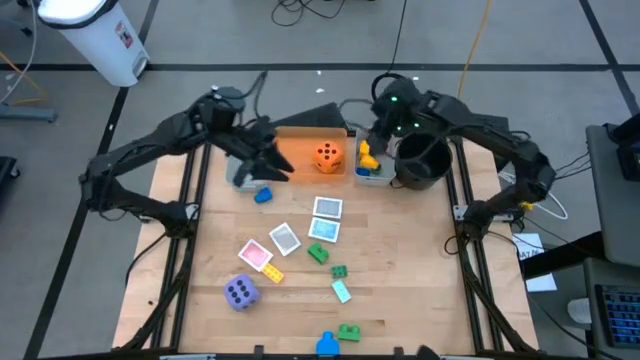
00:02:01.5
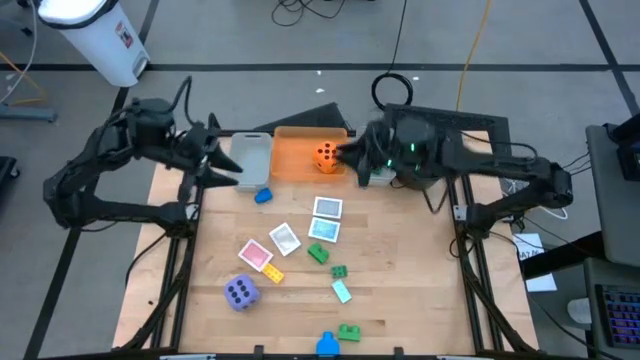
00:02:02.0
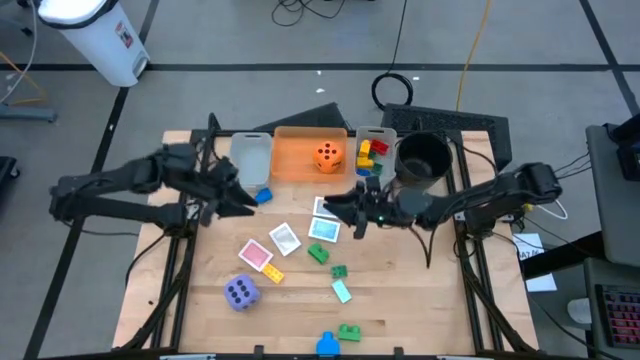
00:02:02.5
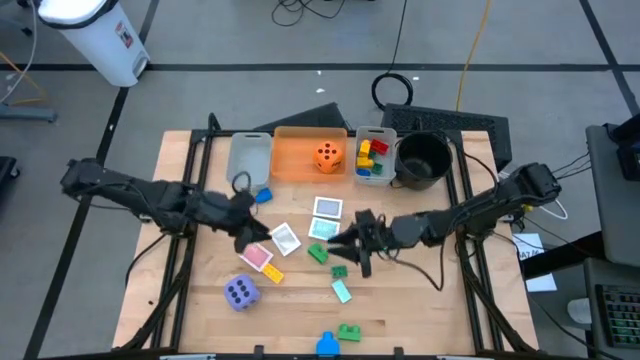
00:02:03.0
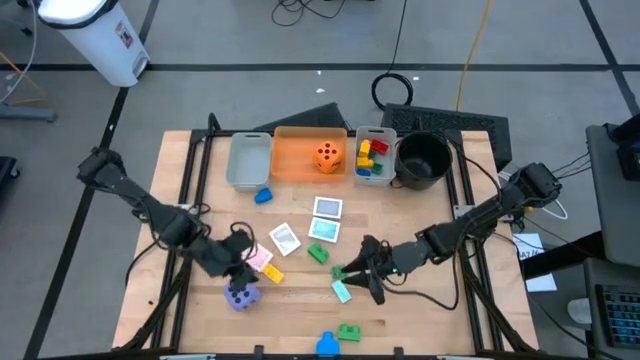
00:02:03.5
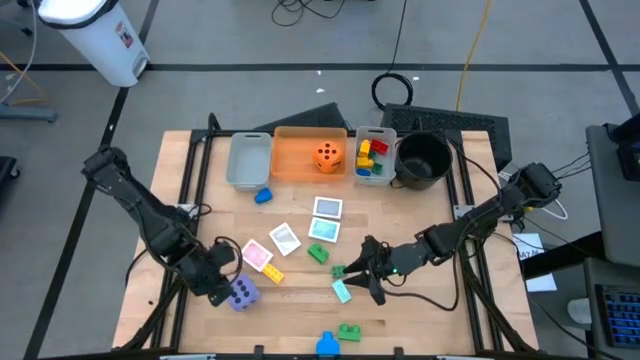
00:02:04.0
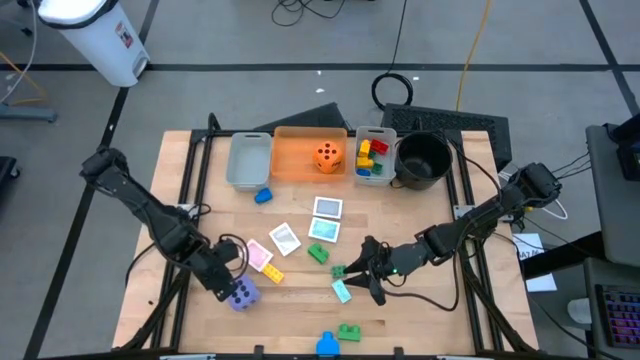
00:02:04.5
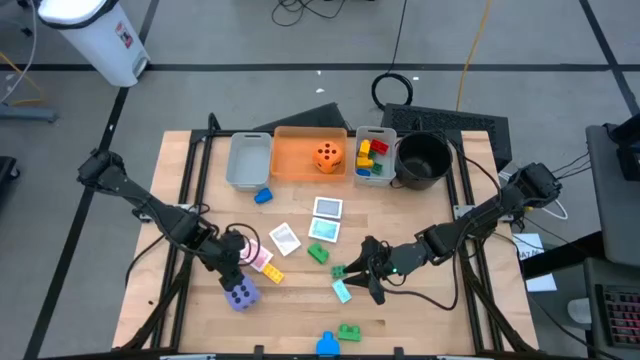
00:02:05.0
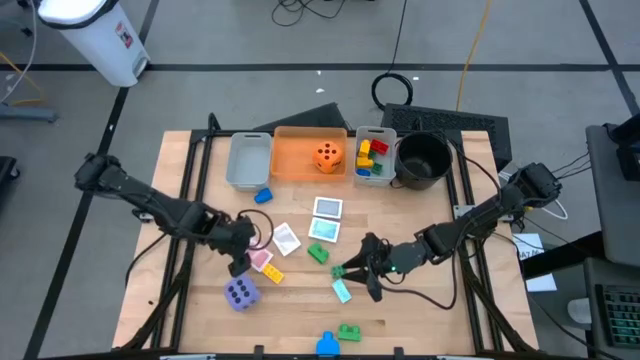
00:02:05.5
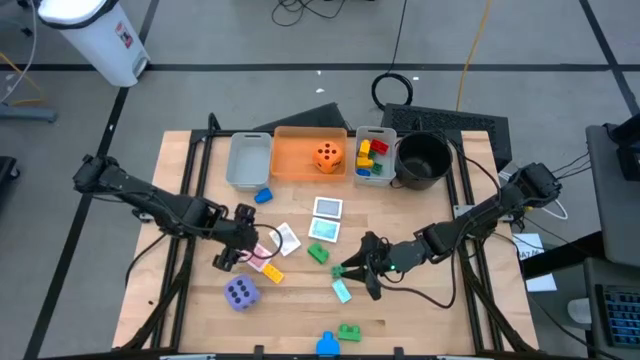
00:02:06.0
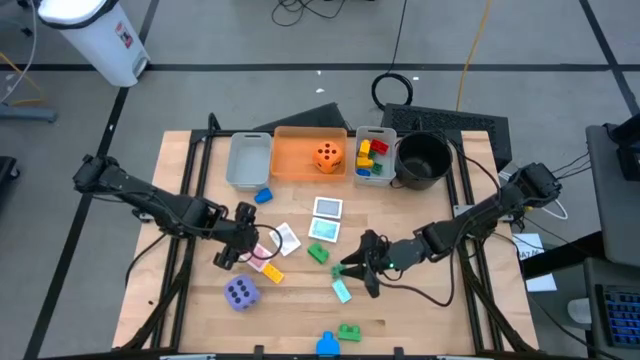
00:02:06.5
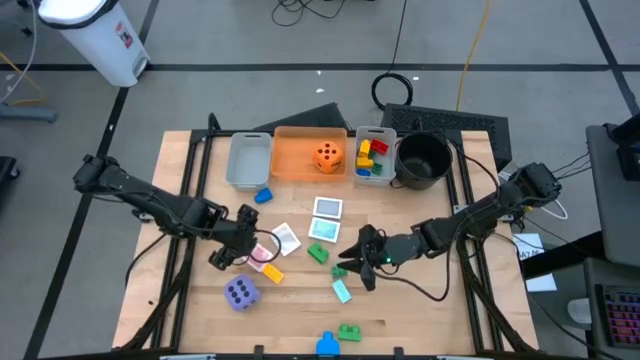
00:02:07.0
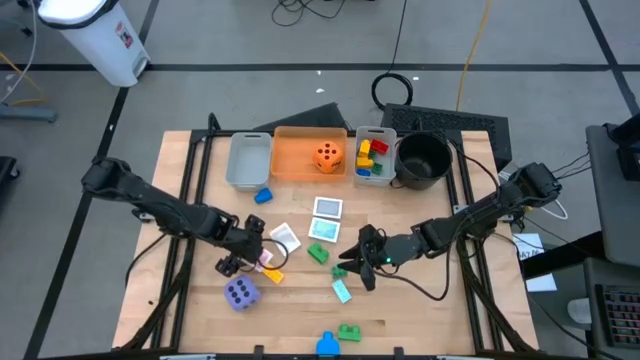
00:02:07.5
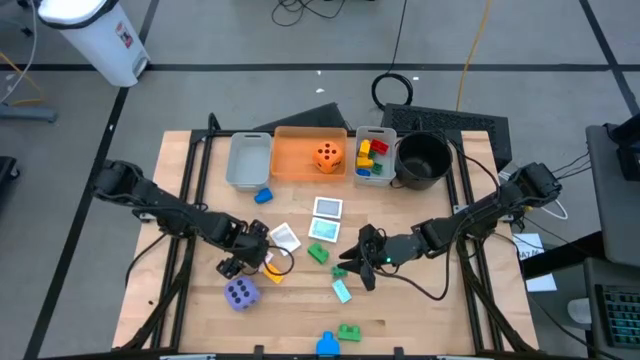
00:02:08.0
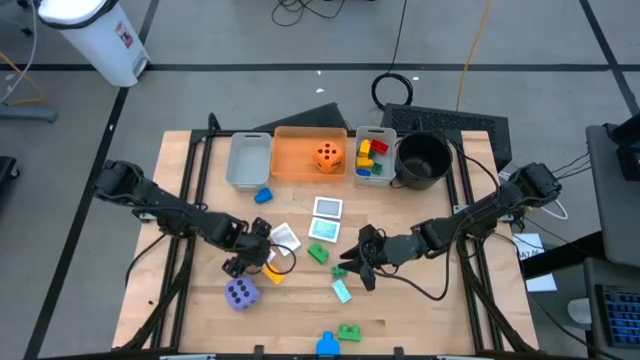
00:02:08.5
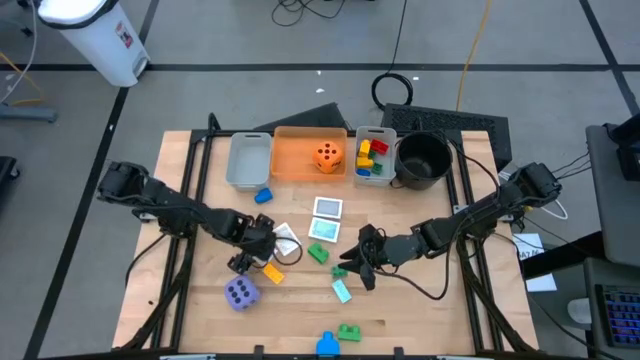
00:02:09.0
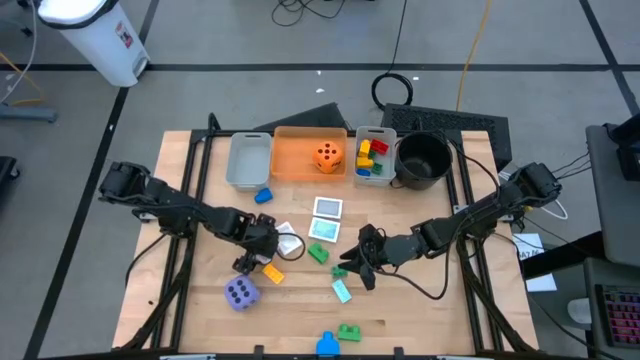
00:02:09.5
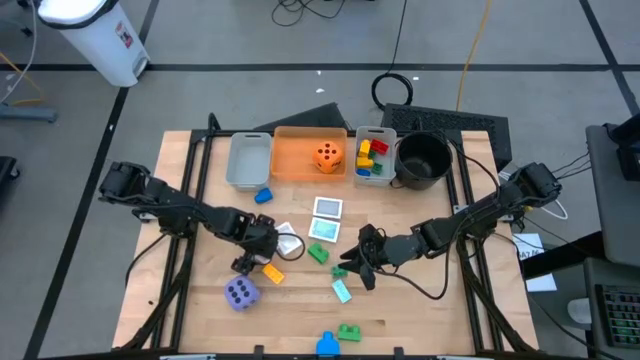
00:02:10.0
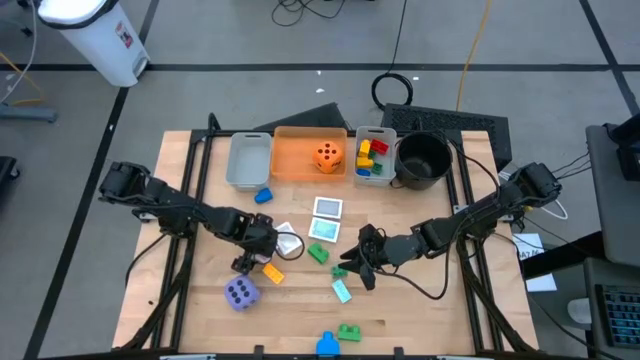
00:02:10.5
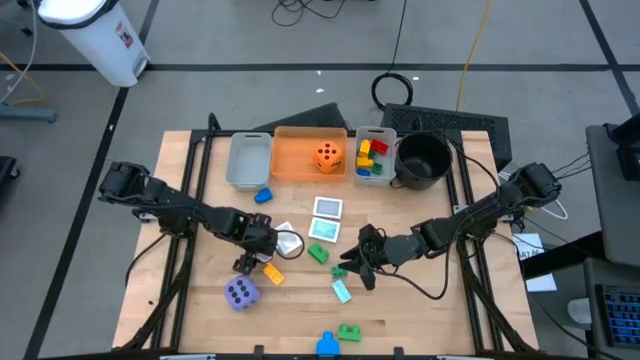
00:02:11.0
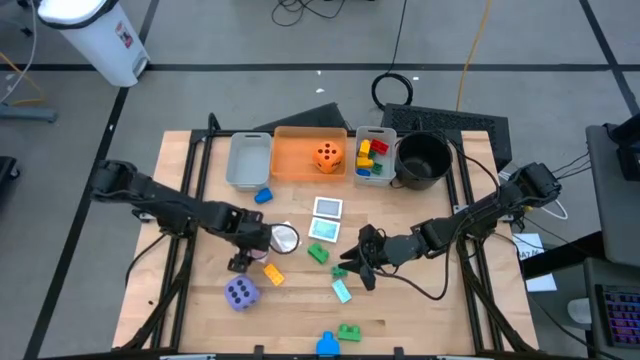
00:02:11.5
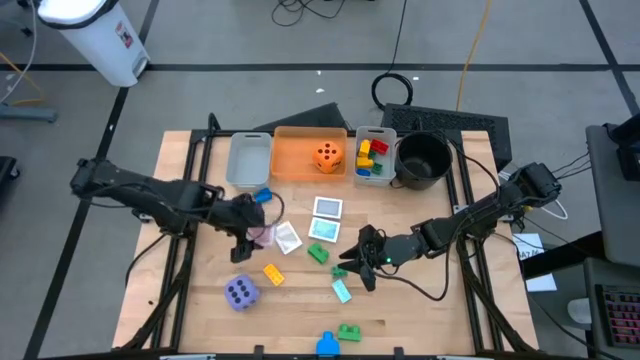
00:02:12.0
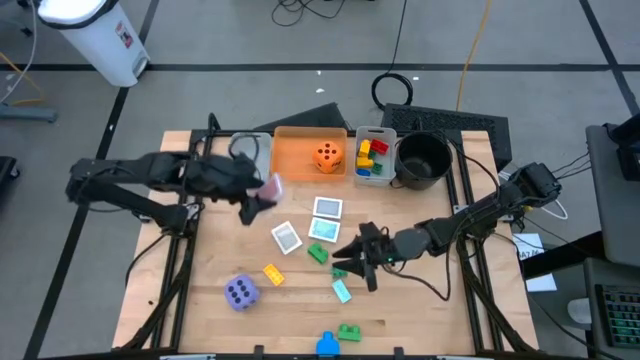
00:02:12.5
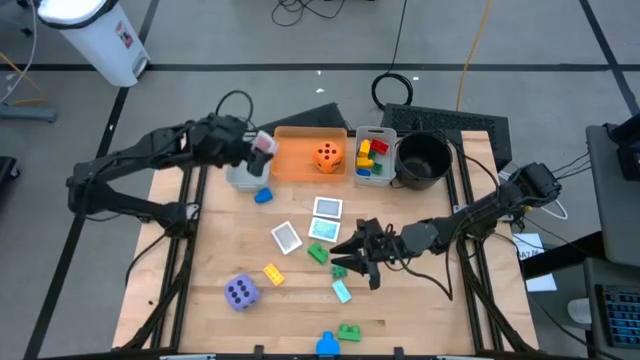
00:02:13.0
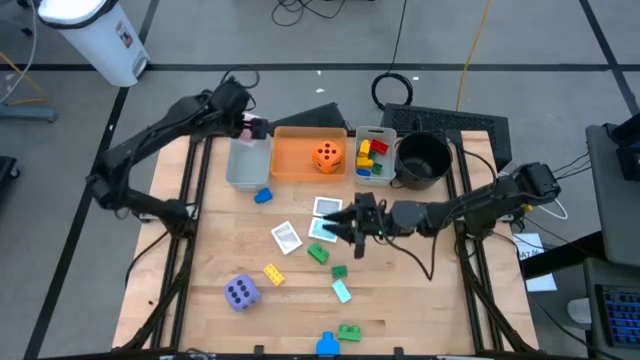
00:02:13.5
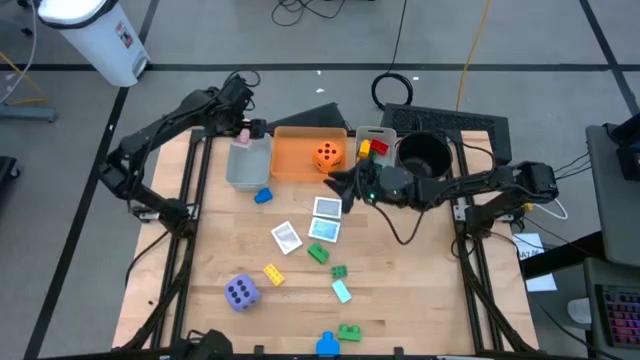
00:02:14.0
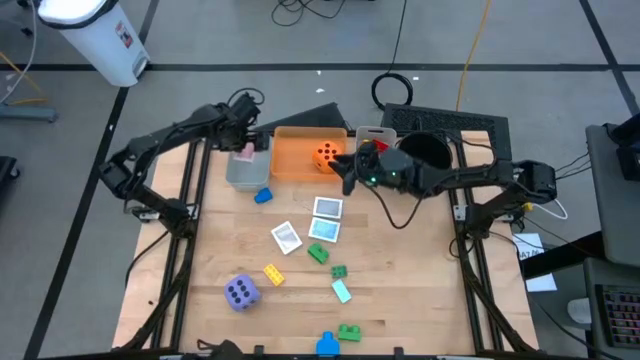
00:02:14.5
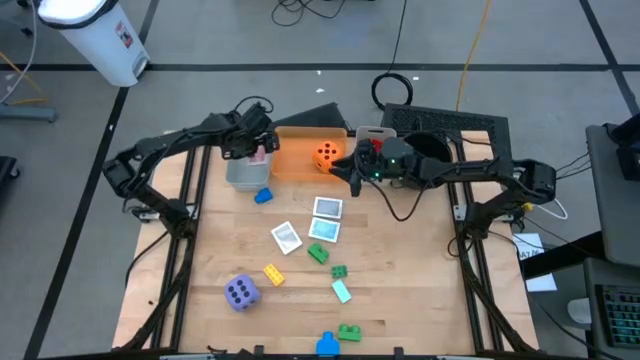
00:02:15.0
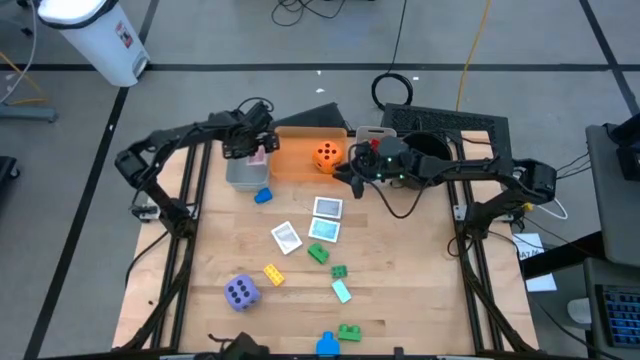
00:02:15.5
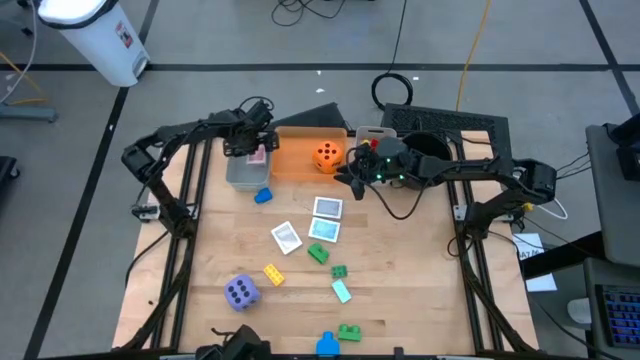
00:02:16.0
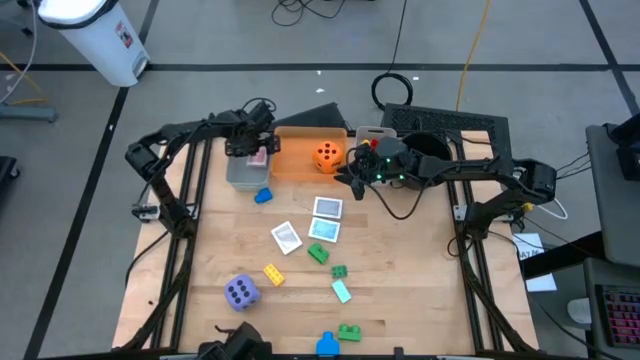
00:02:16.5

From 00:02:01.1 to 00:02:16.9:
Task: Pick & Place Toys
Put the red deck of cards into the left gray bin

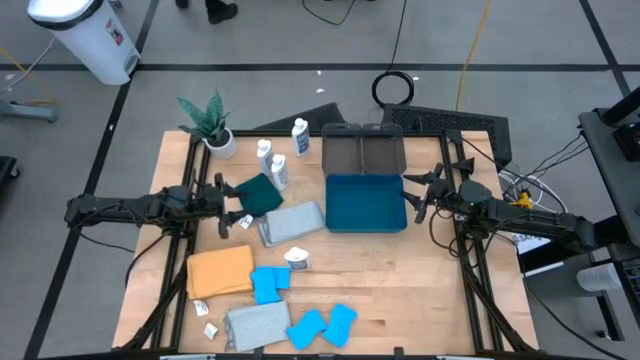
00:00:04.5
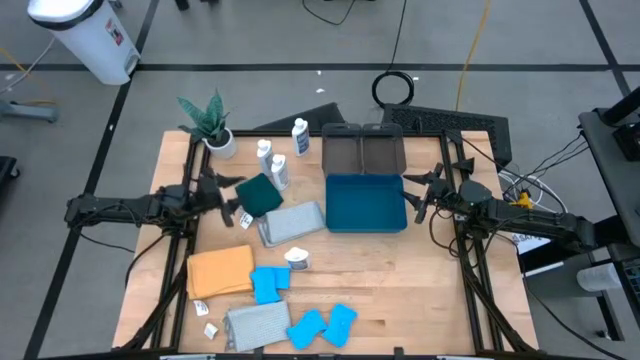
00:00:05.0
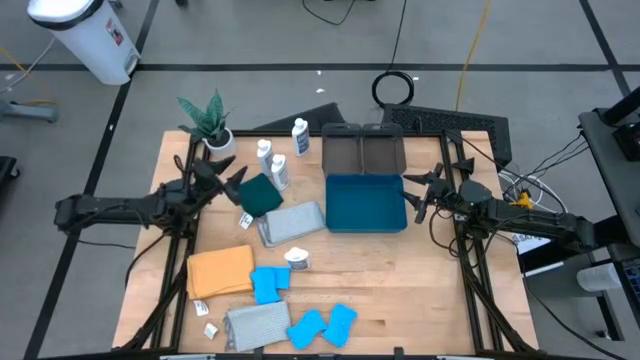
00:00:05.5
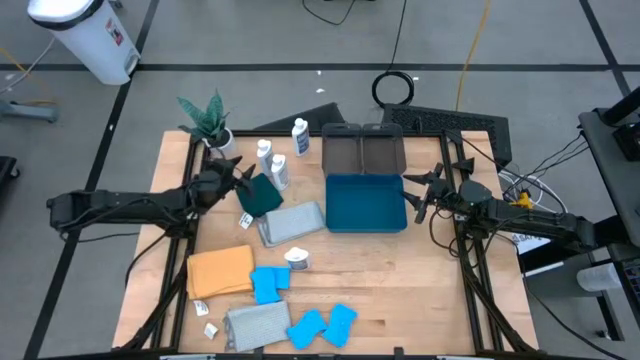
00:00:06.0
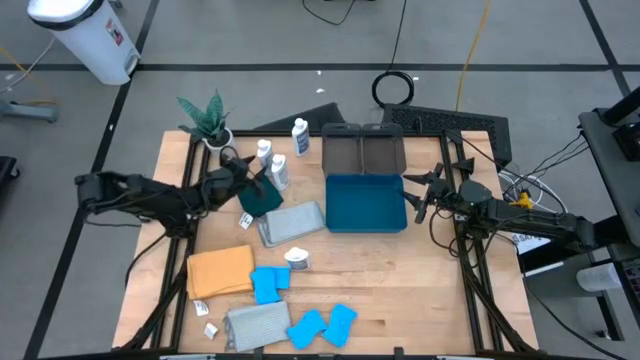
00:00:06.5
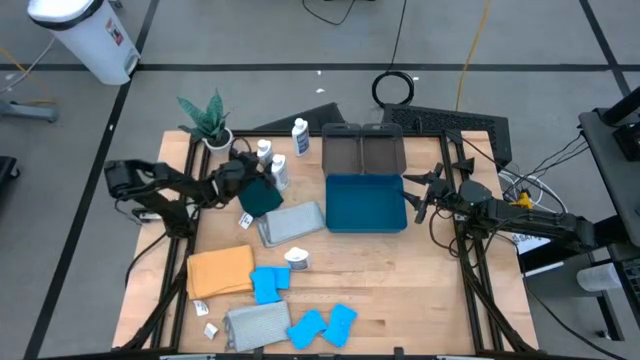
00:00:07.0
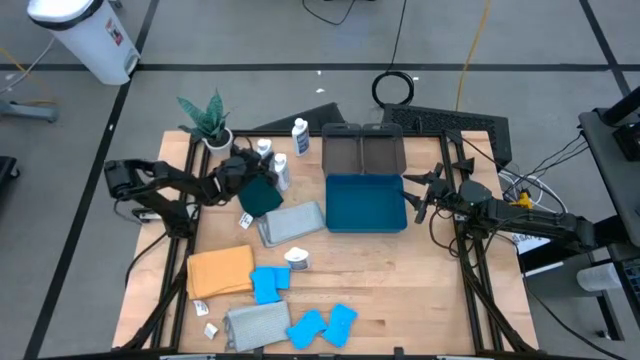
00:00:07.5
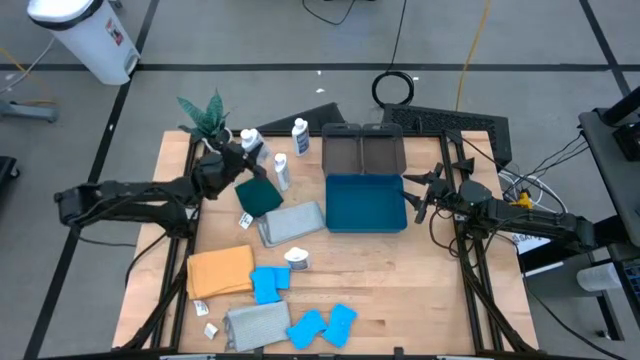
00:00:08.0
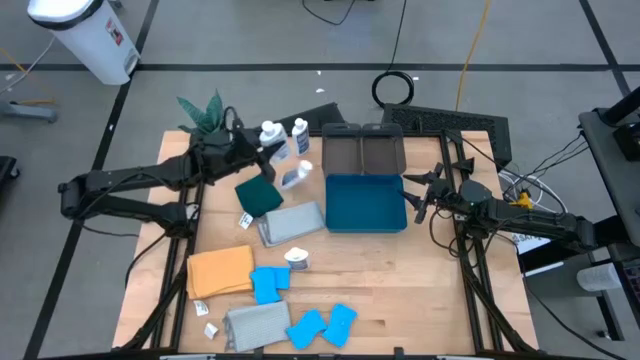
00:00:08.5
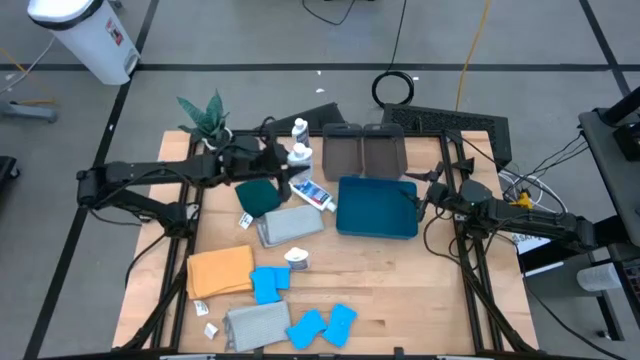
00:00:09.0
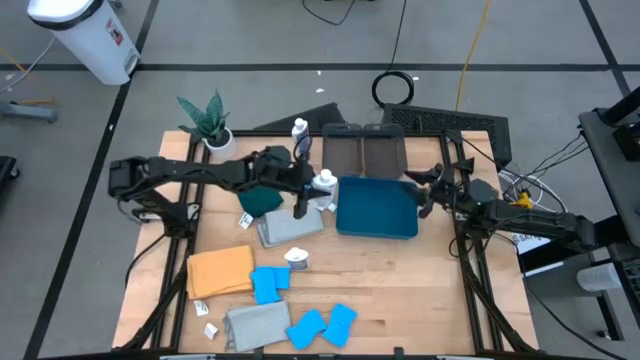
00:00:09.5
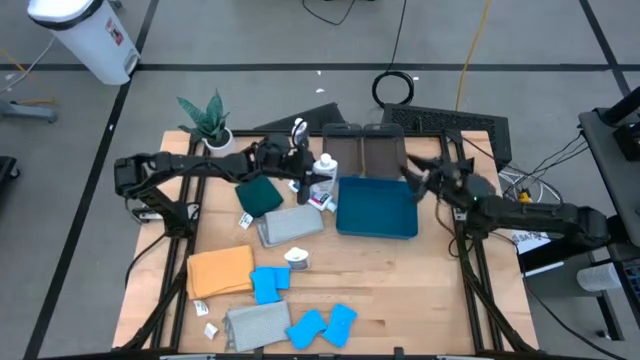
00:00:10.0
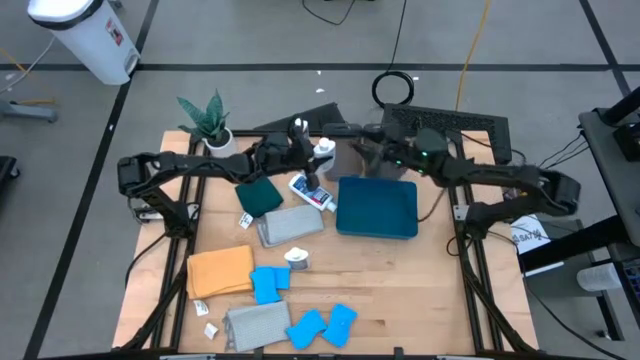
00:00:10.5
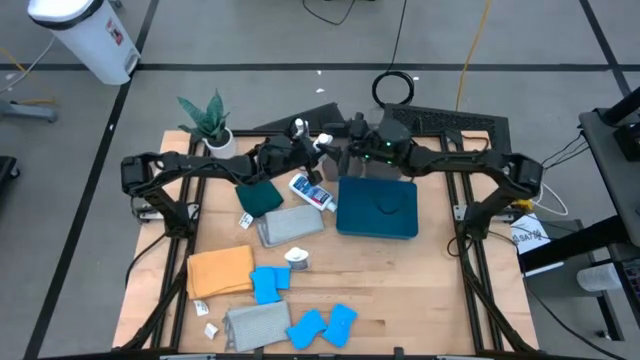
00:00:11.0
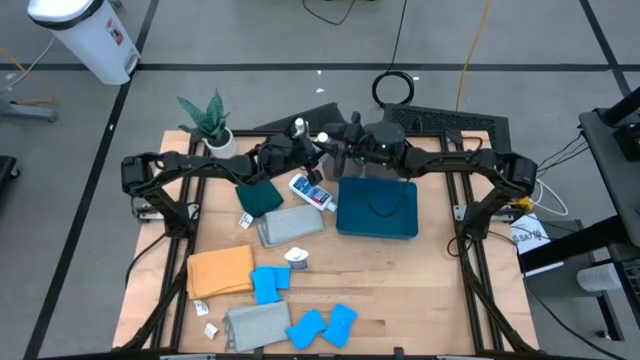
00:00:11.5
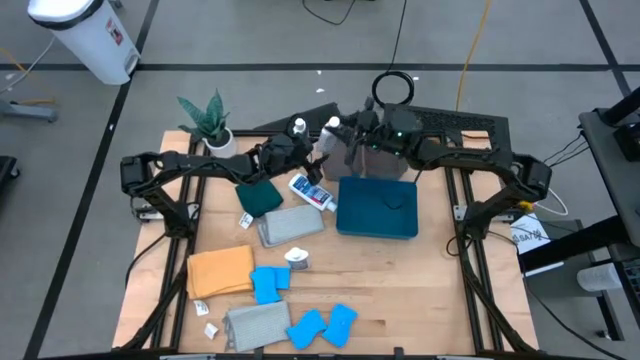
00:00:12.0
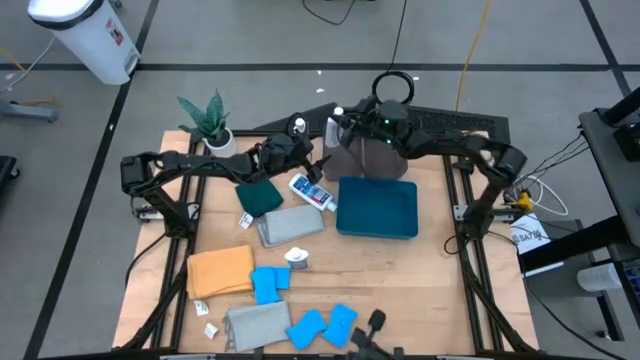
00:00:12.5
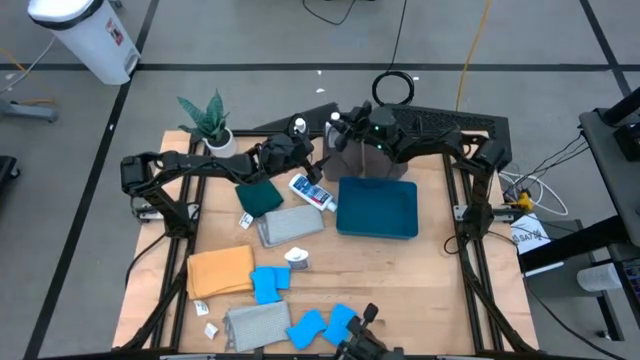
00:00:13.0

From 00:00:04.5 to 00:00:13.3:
Task: Pick & Place Kitchen Items
Put the white clear plastic restorer into the left black bin
